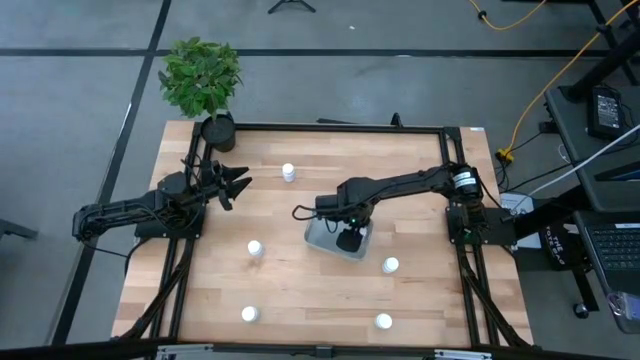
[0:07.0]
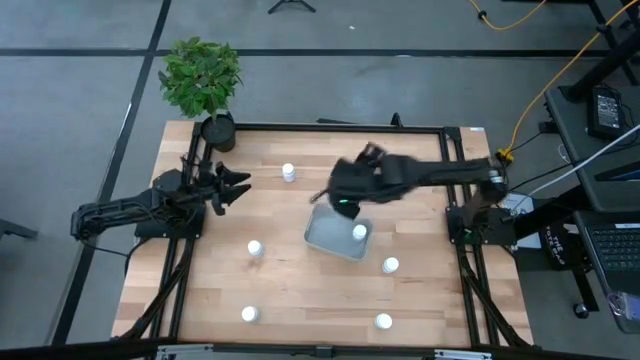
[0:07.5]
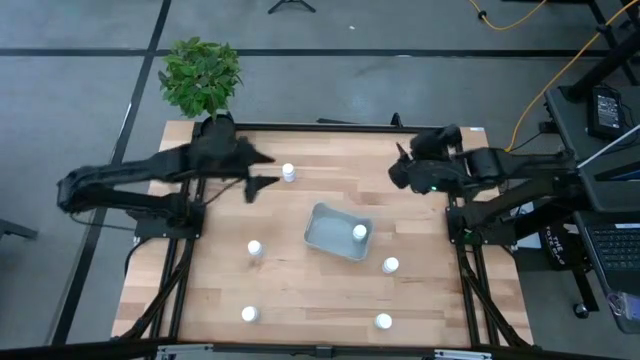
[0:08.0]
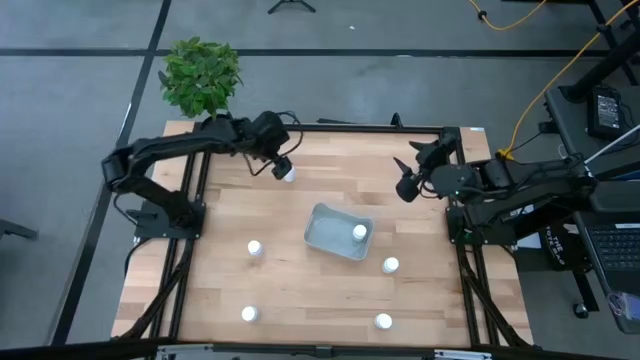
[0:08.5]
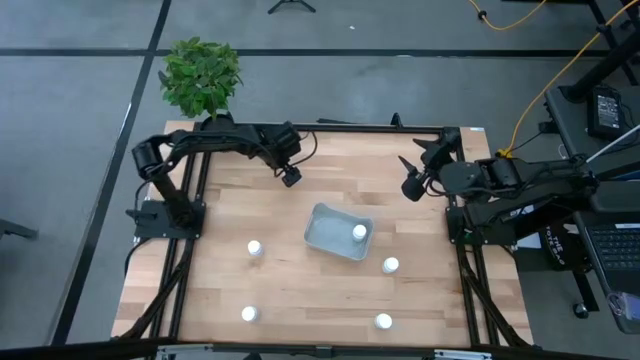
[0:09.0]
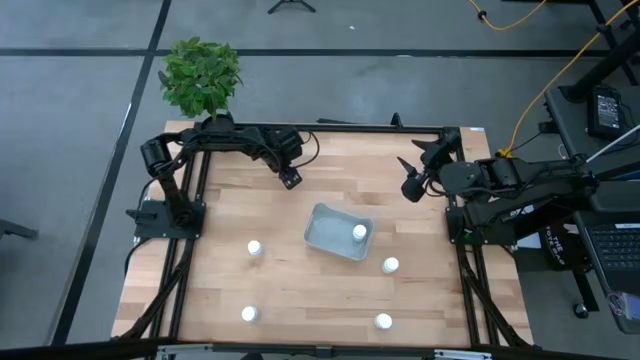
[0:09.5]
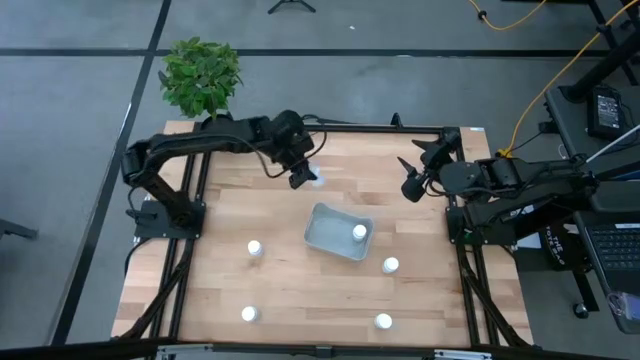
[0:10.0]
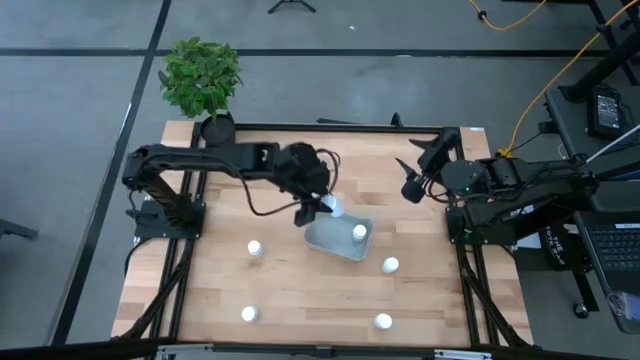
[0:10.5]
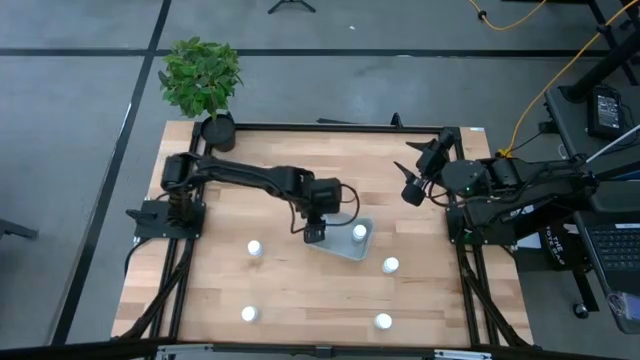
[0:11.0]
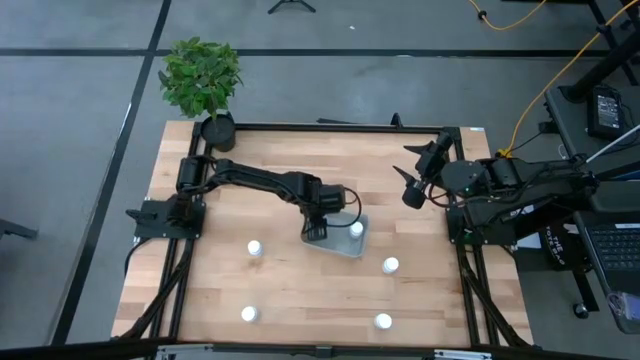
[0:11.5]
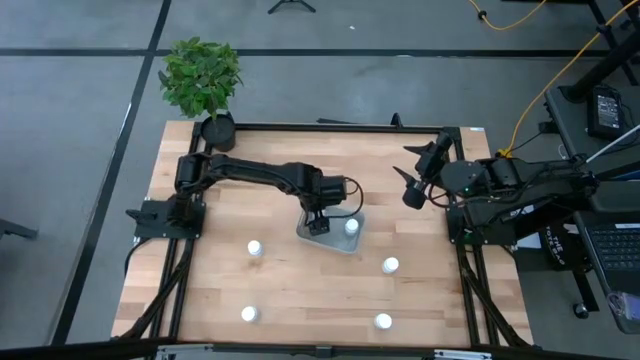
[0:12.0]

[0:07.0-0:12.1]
Task: Pick and place pill bottles into a basket
Put the white pill bottle into the gray bin

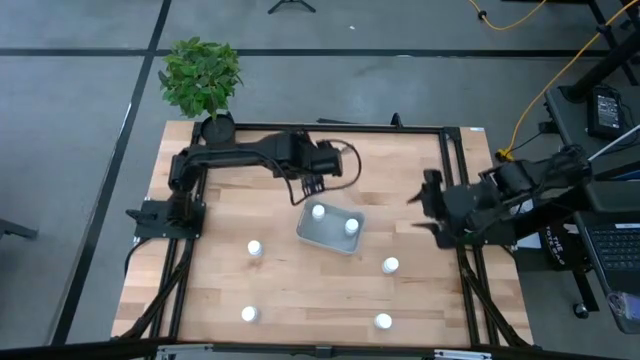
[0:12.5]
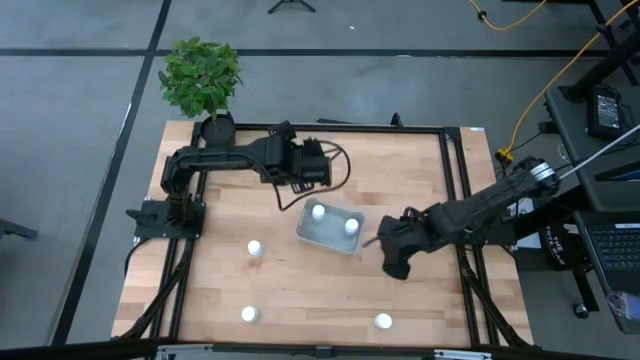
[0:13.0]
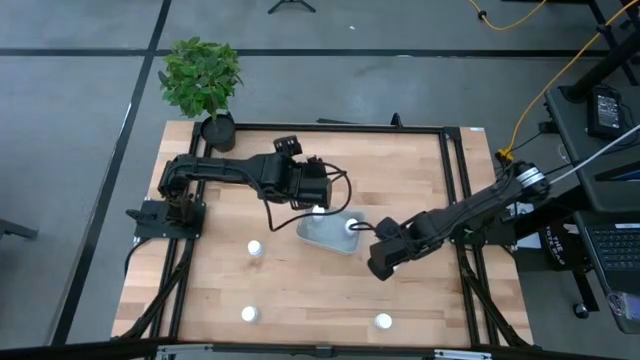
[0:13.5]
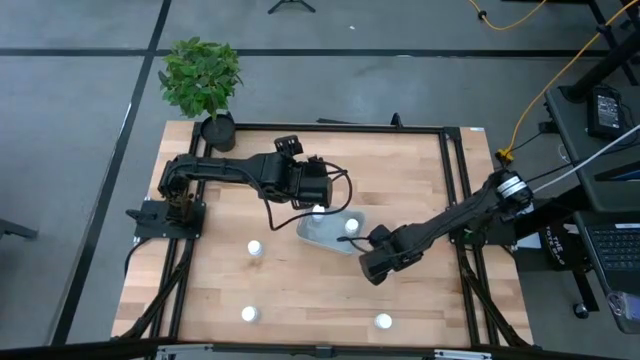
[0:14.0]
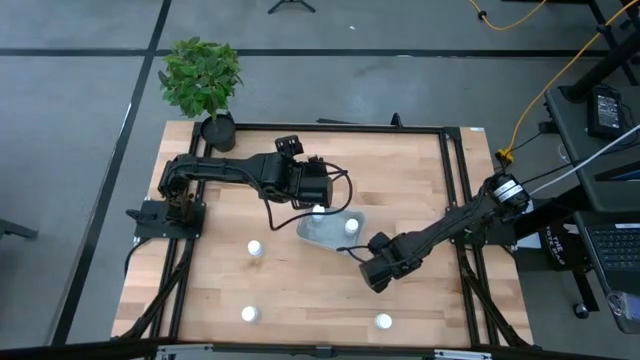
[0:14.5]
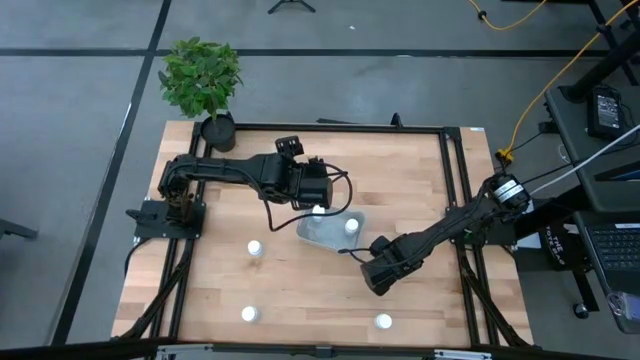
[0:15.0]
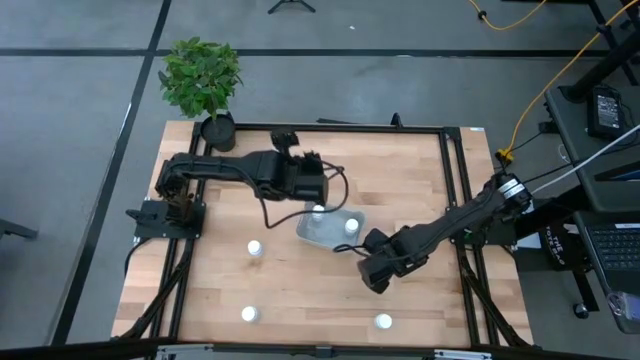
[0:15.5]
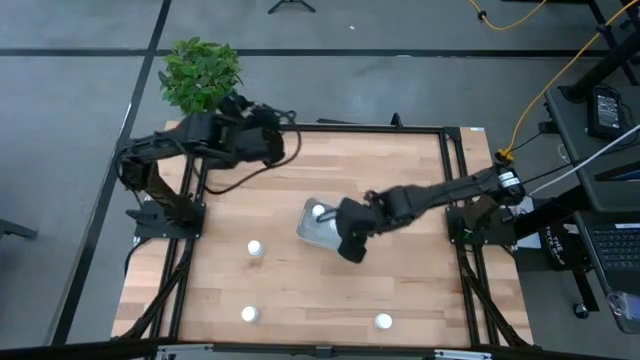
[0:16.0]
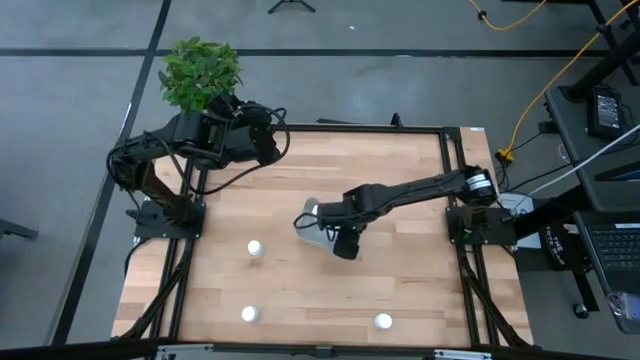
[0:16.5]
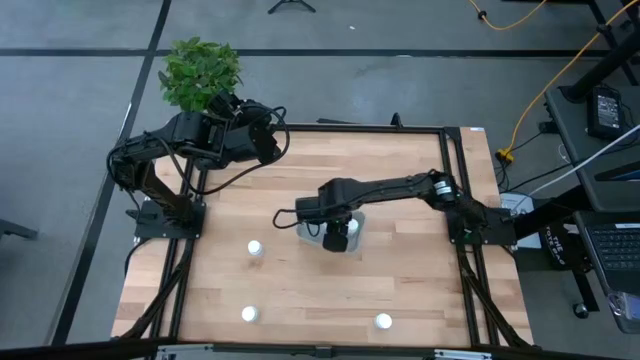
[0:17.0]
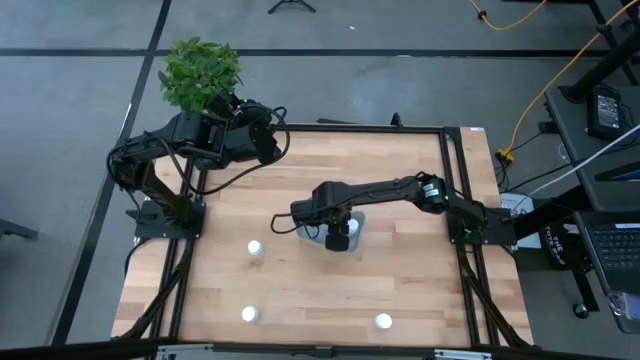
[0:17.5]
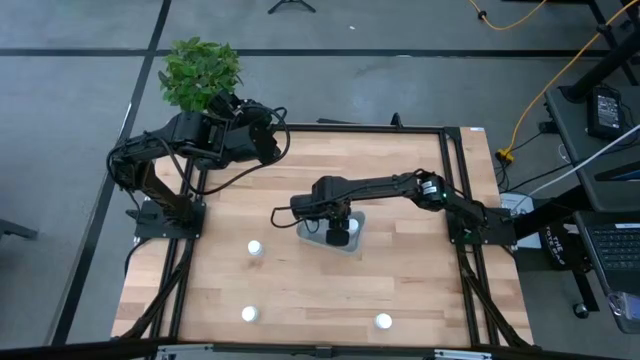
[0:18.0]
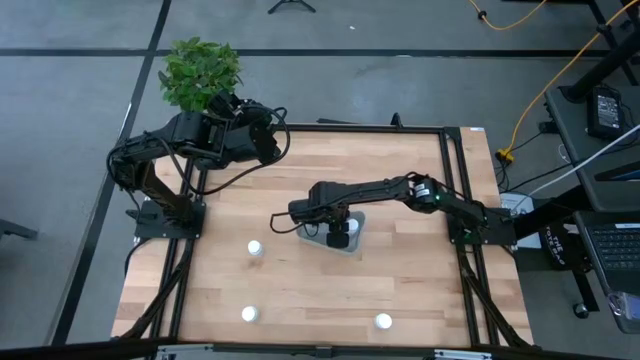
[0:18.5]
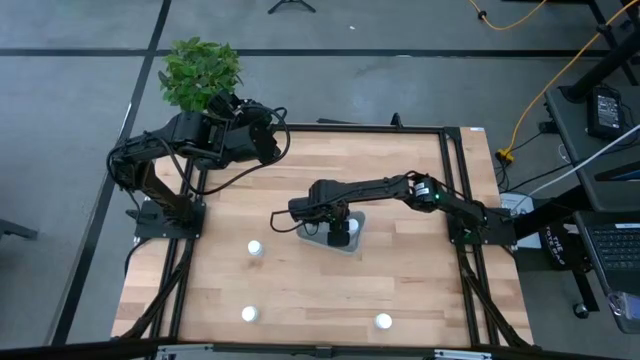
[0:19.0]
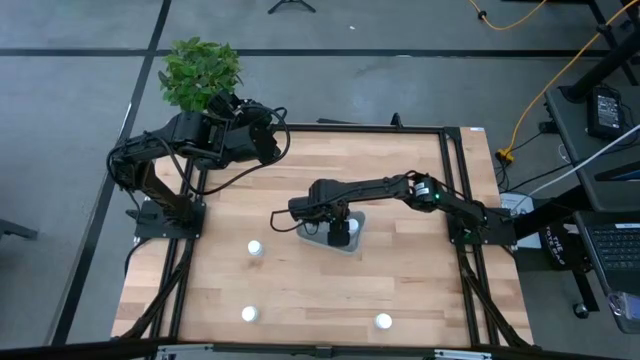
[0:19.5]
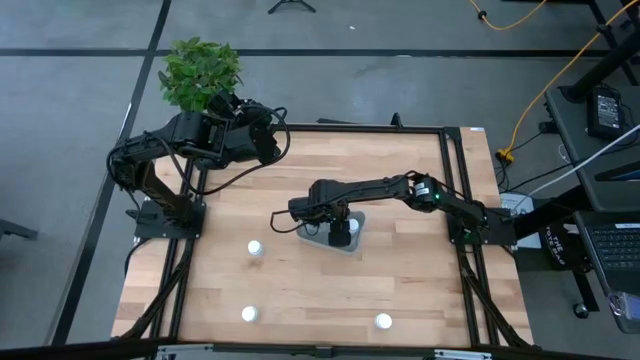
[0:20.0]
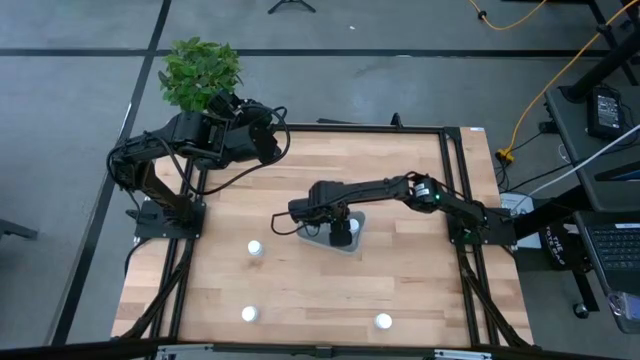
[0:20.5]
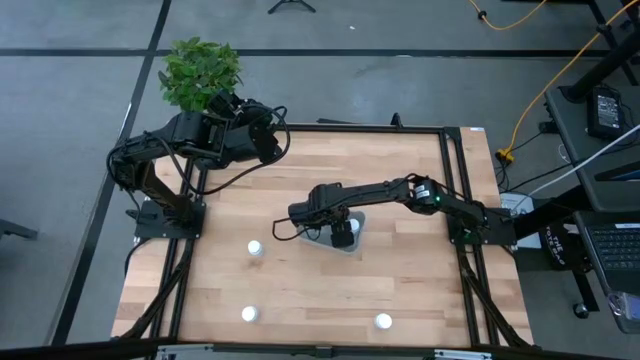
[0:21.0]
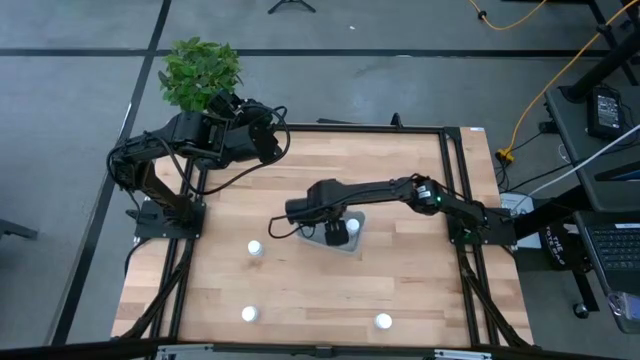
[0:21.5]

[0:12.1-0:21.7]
Put the white pill bottle into the gray bin

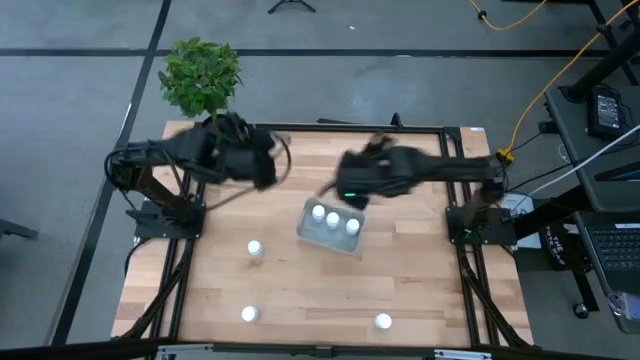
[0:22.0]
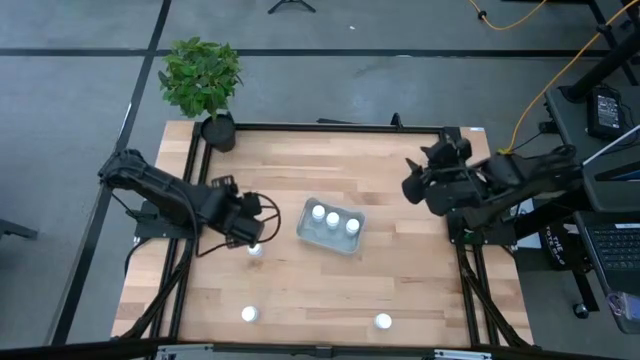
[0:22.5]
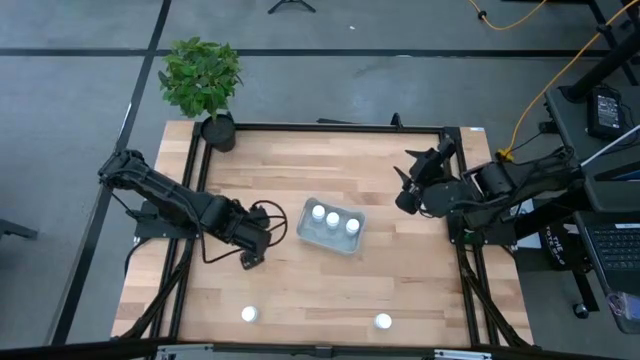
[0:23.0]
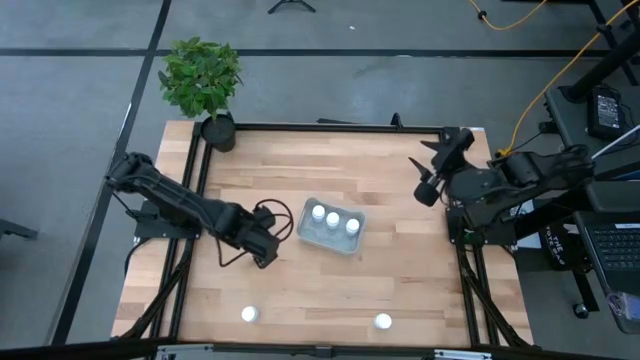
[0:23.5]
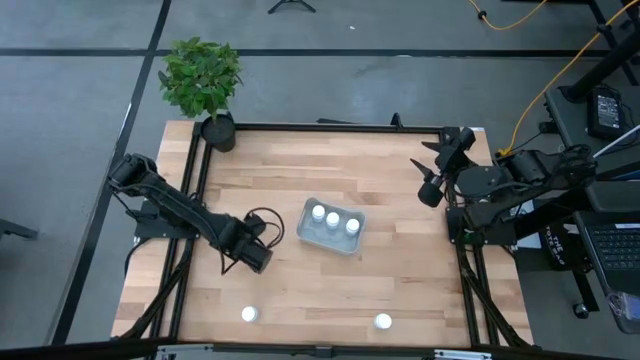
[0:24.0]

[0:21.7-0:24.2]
Put the white pill bottle into the gray bin

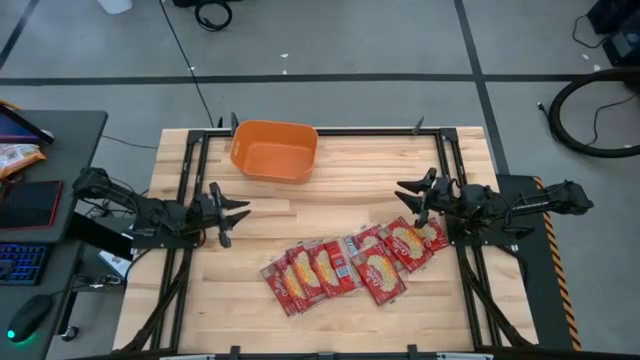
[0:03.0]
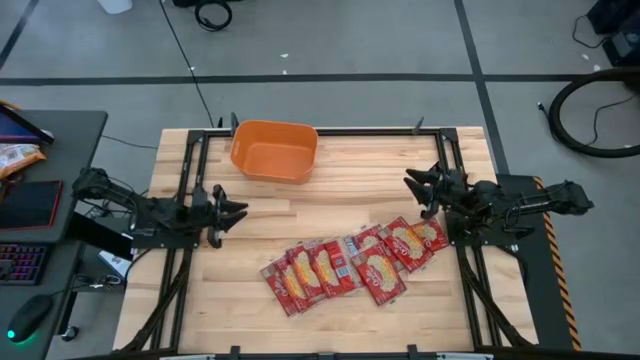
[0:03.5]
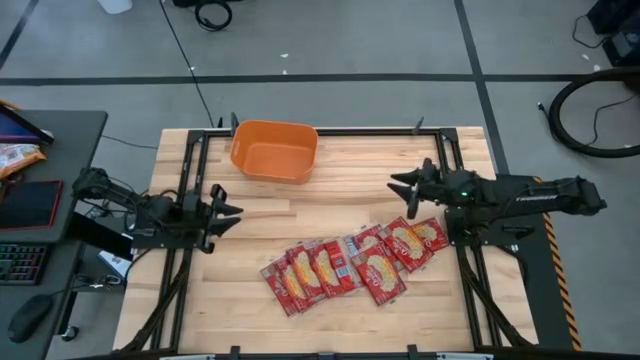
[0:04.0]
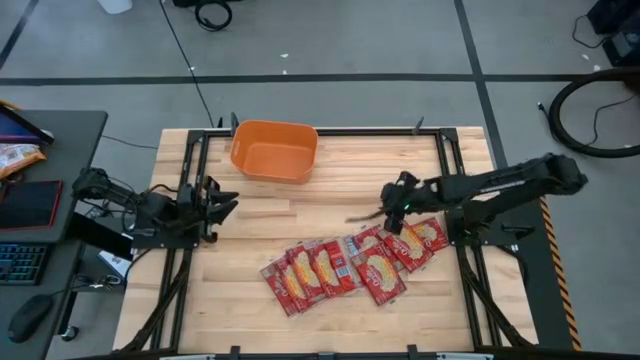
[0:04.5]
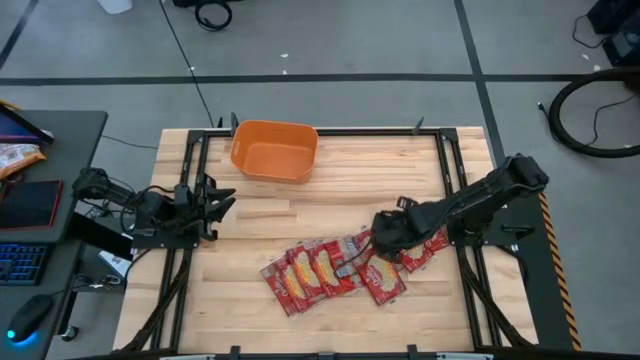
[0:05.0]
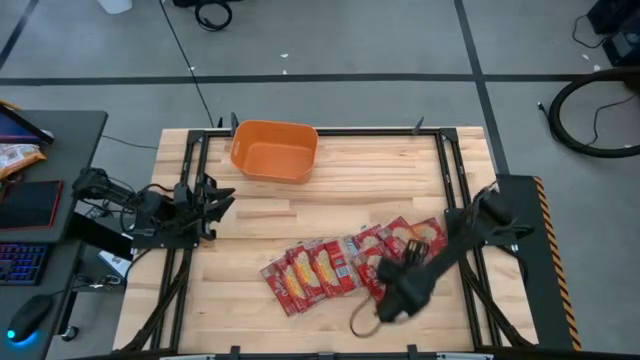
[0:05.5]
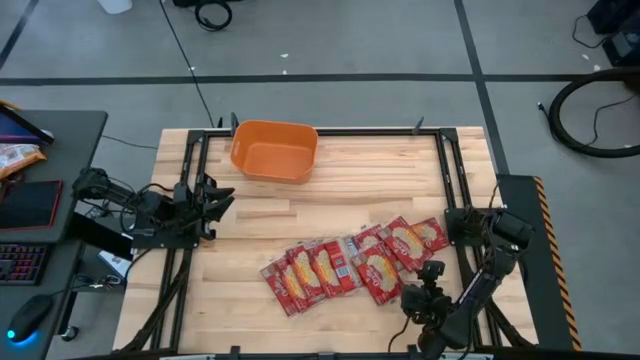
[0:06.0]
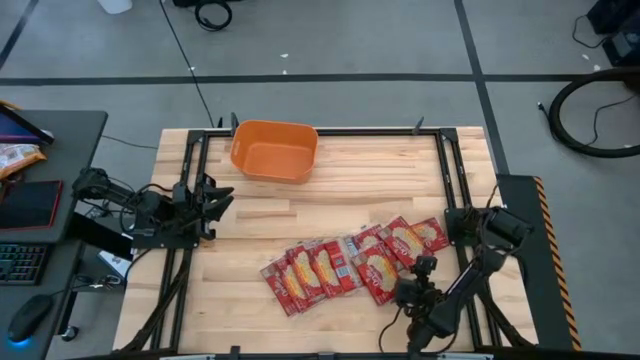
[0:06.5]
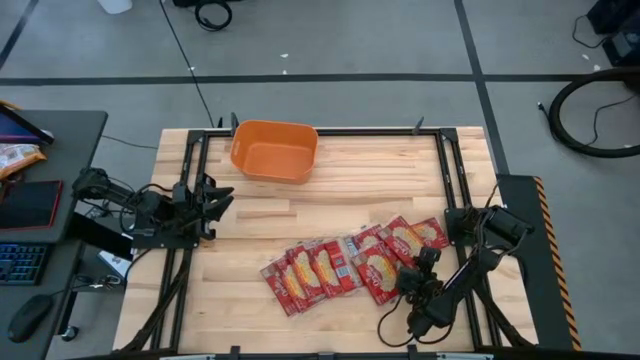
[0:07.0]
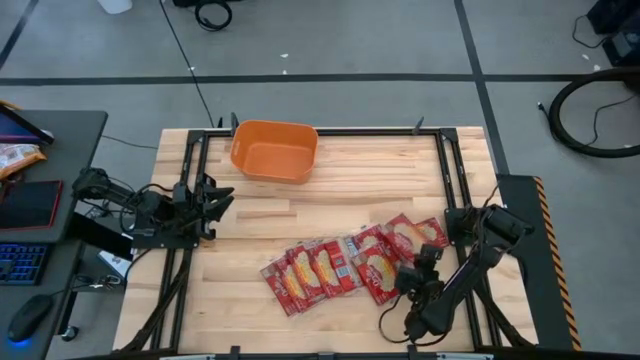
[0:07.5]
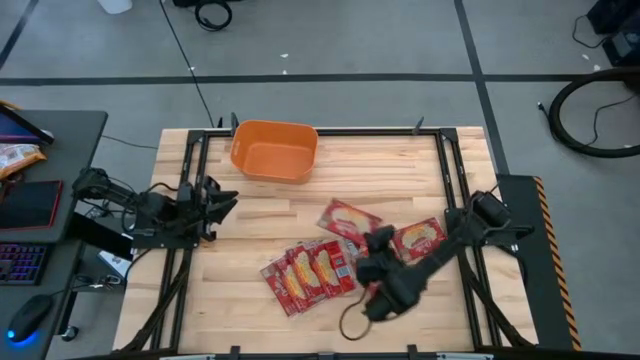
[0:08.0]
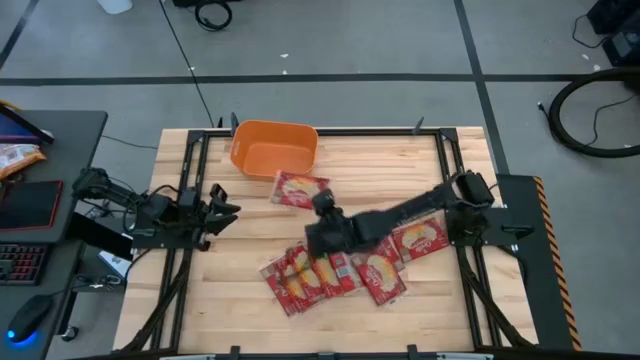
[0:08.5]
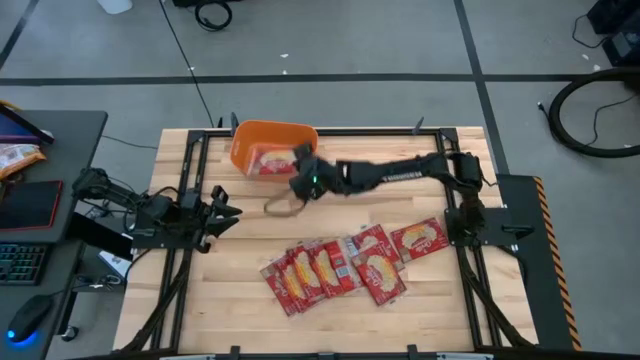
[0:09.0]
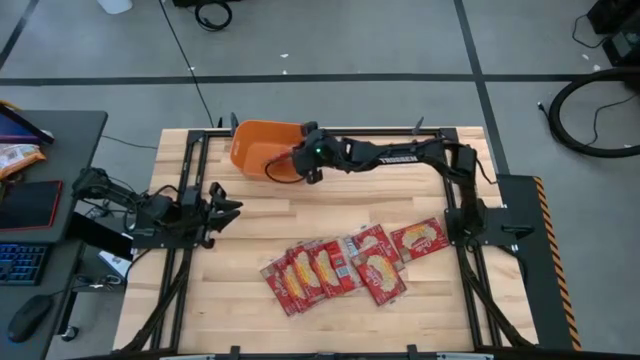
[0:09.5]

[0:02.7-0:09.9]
Task: Sort popcorn bags into baskets
Put the red popcorn bag into the orange bin
